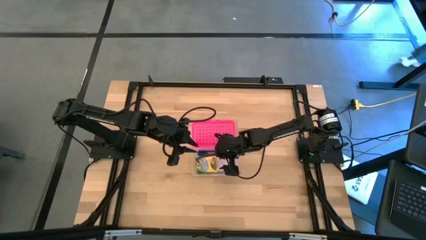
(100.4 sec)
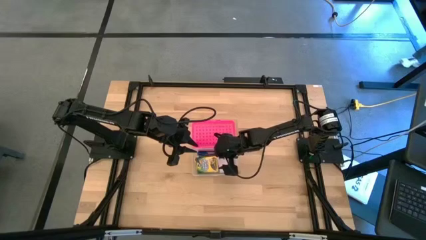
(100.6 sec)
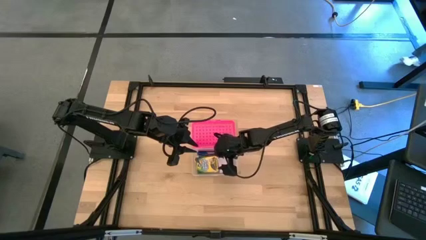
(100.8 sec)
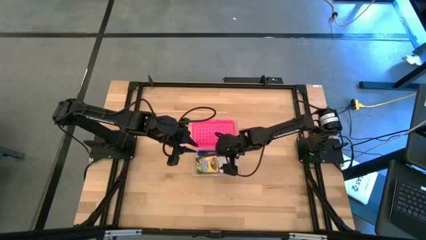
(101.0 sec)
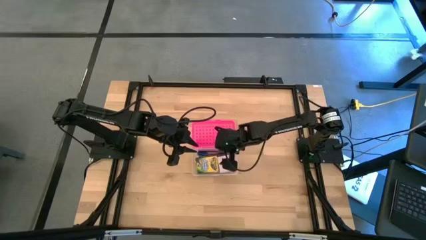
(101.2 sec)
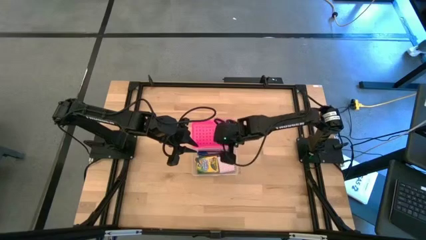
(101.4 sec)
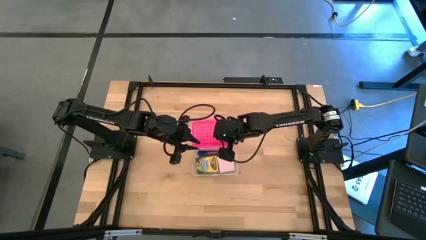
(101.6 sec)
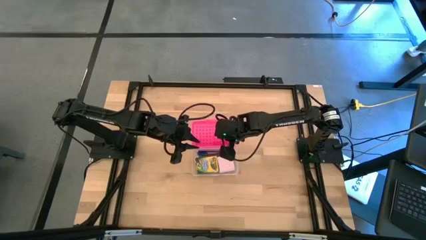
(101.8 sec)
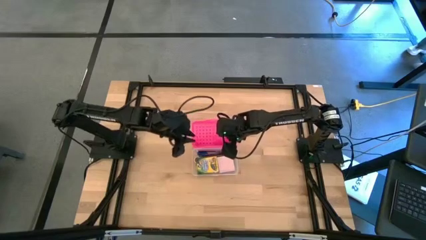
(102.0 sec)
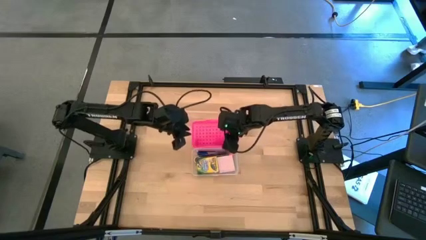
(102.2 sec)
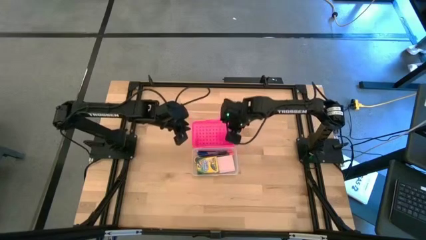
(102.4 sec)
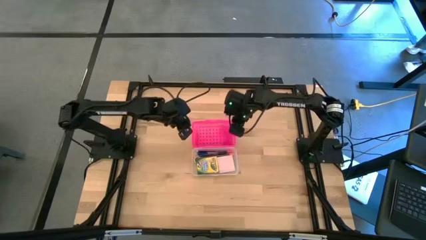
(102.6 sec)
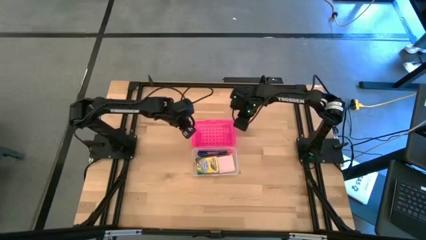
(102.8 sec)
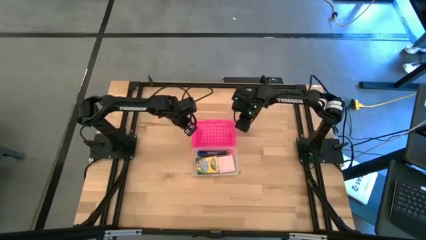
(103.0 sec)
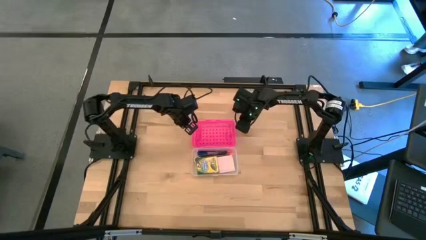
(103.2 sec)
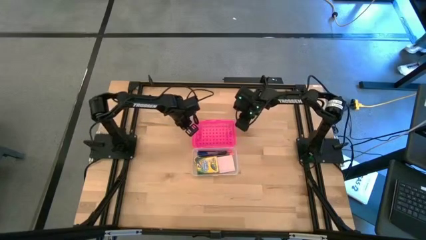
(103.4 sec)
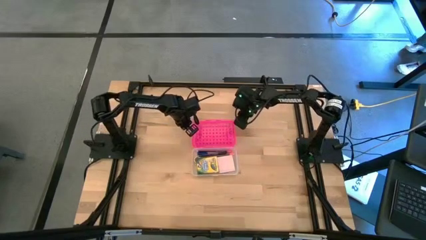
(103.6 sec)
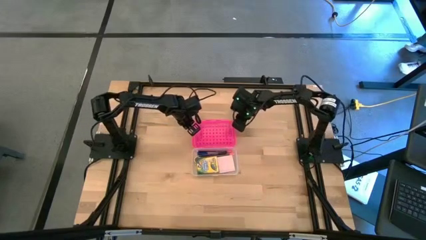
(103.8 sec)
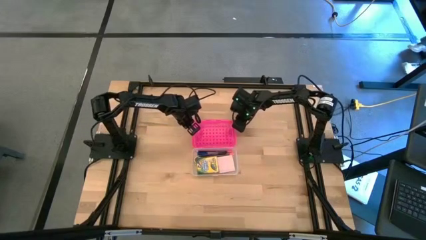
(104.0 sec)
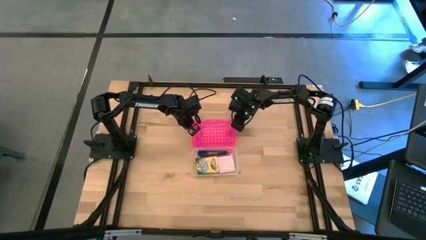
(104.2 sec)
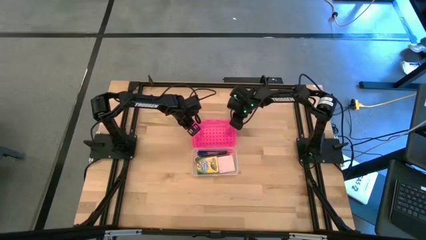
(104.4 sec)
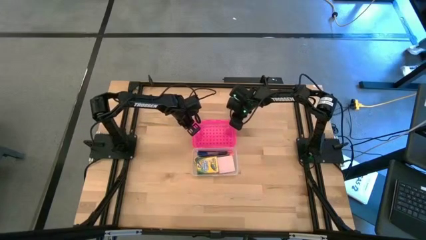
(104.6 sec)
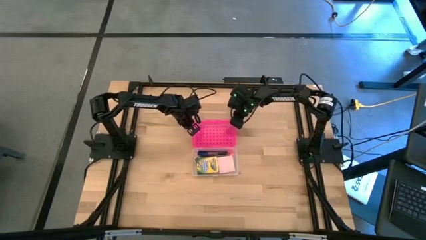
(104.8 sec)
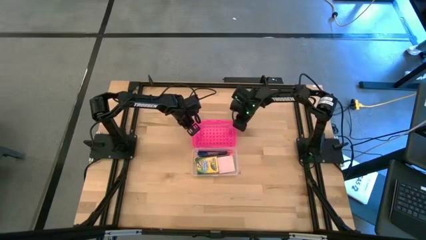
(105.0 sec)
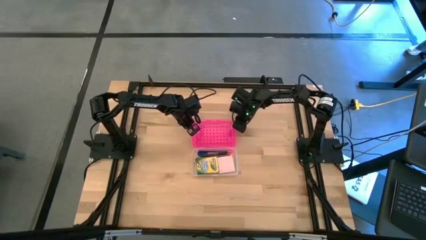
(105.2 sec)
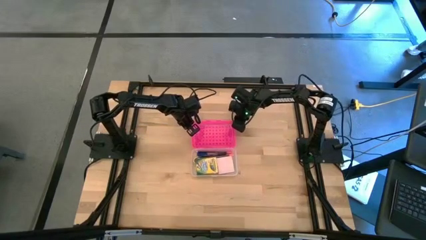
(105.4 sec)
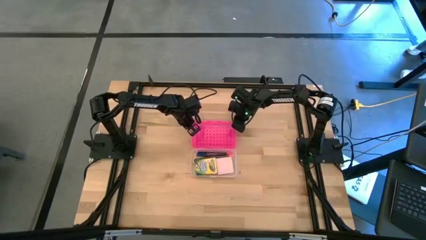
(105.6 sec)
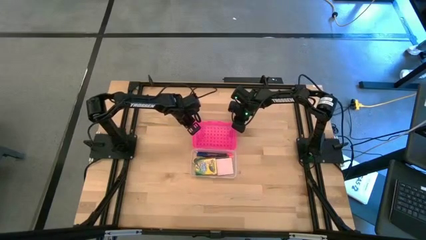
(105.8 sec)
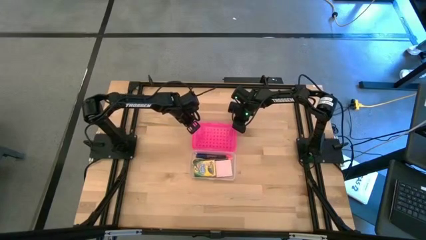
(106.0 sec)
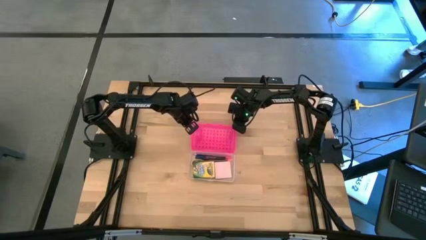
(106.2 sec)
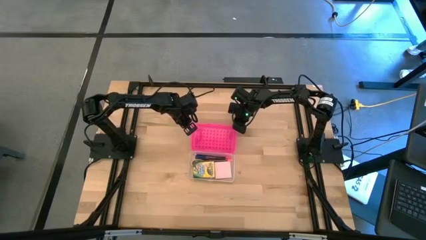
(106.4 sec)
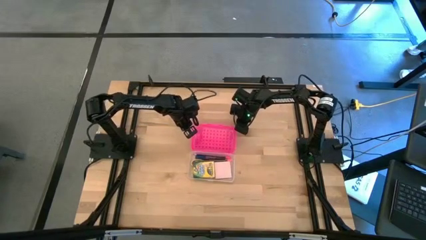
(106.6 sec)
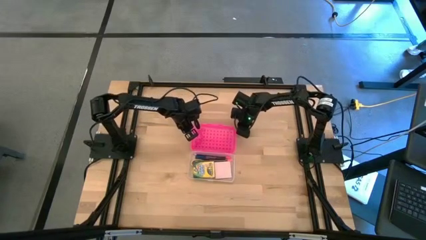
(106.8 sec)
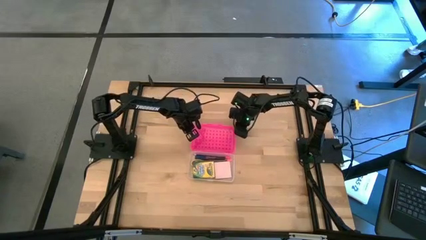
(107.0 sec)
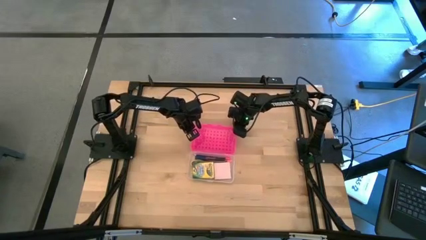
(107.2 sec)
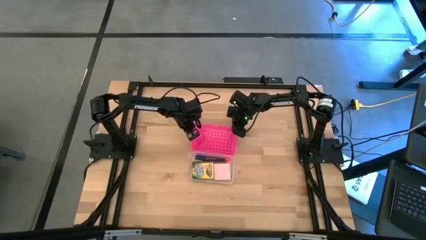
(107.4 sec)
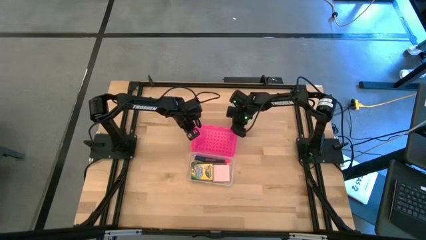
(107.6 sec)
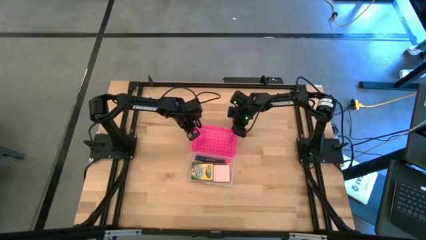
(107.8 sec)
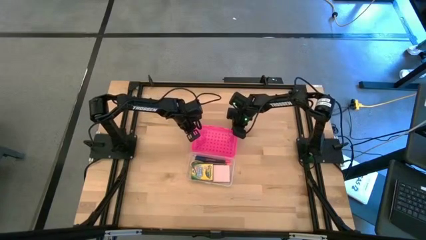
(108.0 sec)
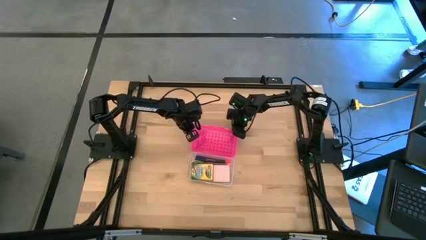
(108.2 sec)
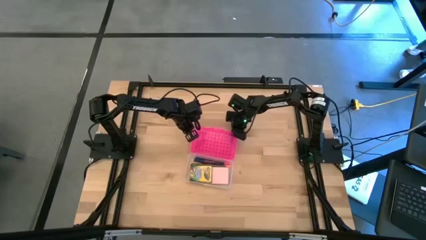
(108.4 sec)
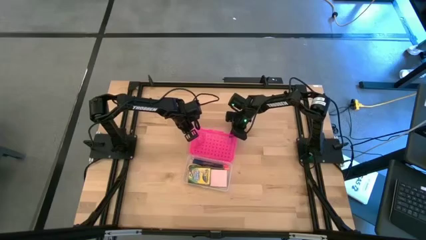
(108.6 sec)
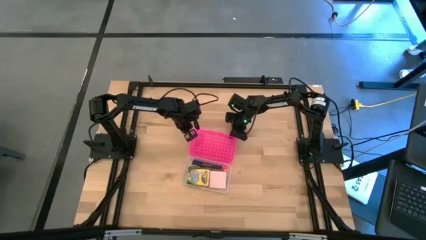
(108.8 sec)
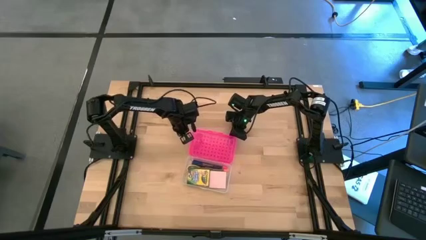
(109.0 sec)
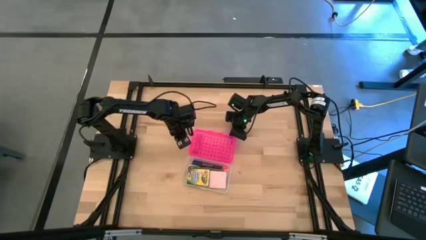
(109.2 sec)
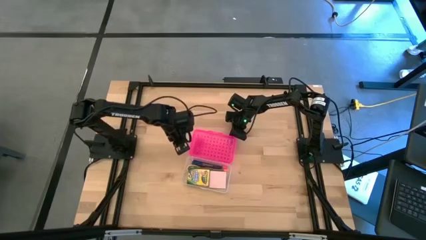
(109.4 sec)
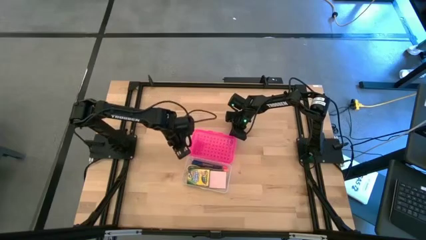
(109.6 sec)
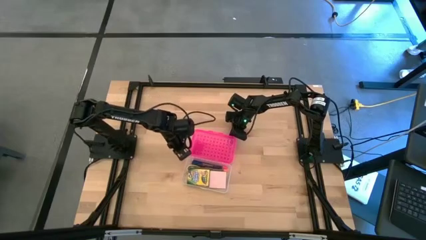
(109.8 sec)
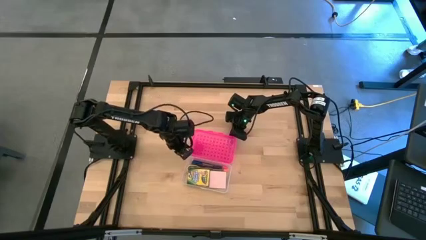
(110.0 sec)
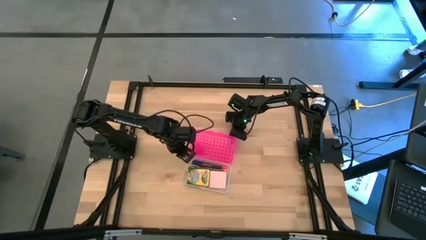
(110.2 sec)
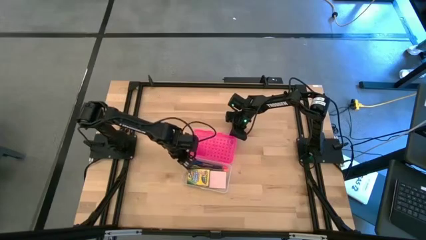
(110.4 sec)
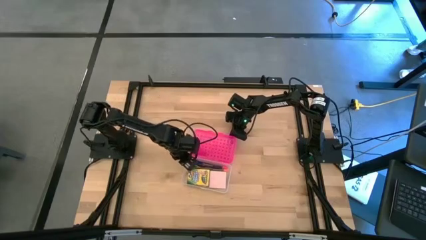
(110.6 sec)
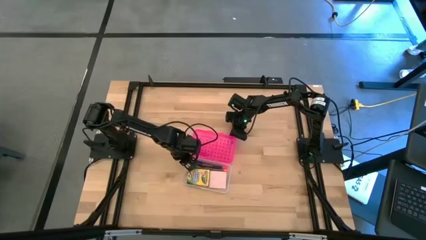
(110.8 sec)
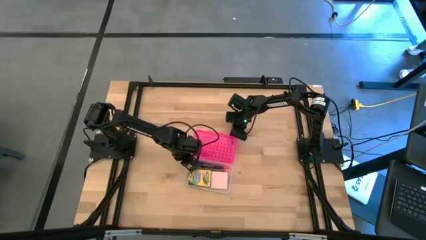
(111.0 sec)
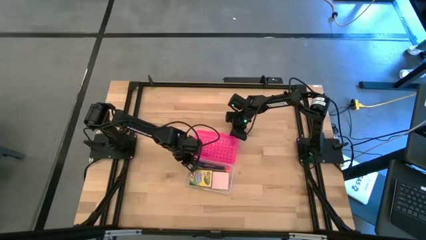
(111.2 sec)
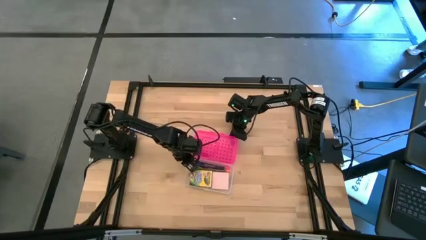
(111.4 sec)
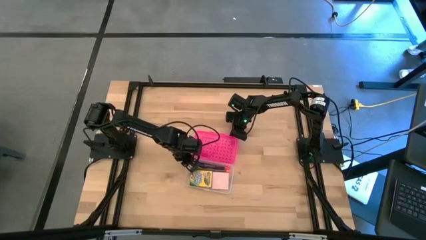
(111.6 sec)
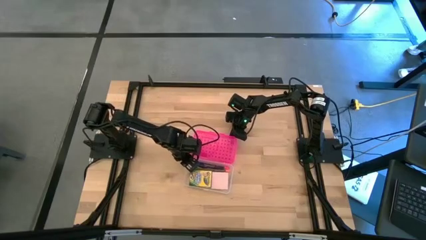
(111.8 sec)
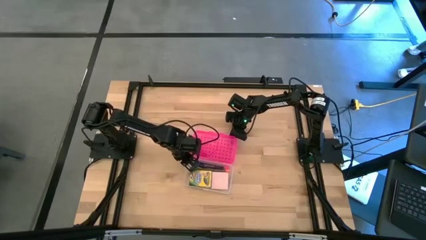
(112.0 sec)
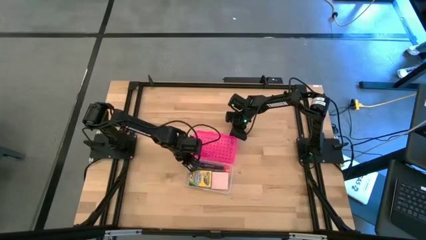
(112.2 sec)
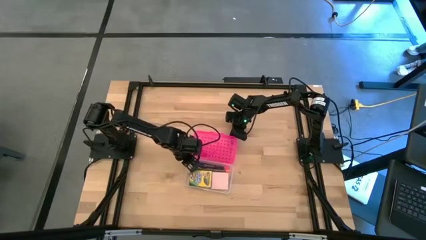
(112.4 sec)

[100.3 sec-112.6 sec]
Task: Pack school essentials
Close the cover of the school supply organizer

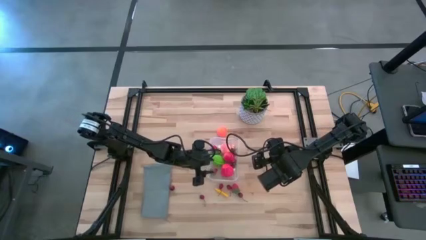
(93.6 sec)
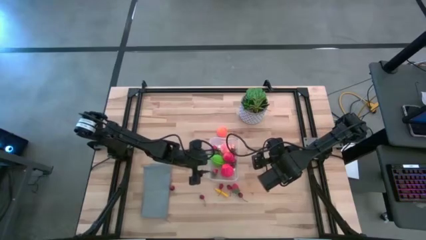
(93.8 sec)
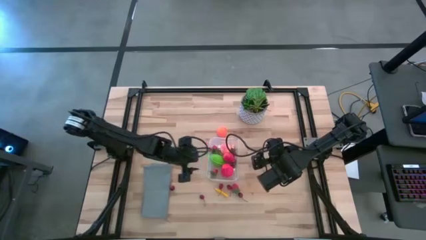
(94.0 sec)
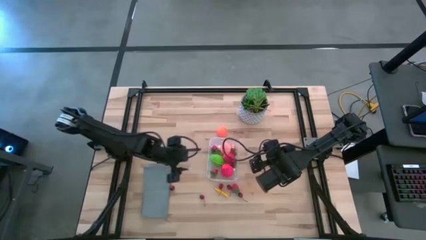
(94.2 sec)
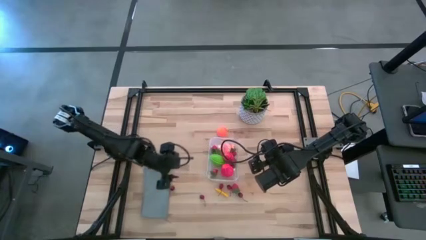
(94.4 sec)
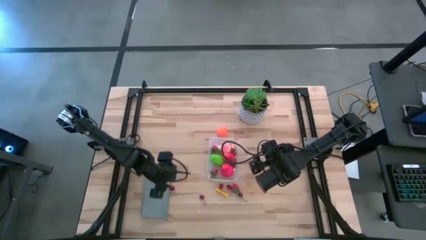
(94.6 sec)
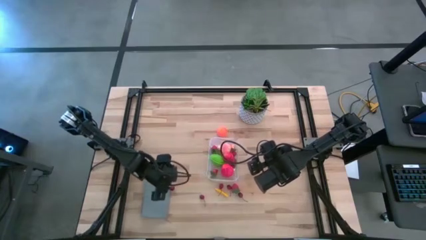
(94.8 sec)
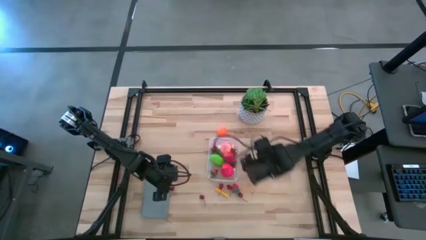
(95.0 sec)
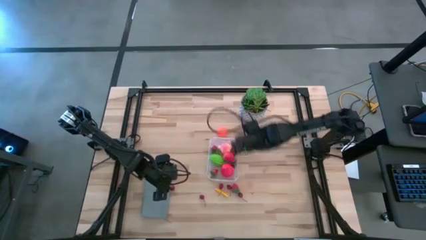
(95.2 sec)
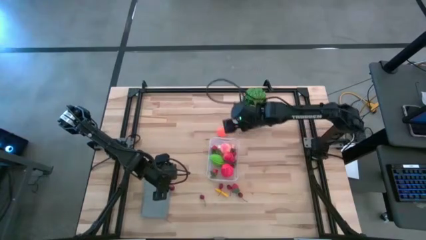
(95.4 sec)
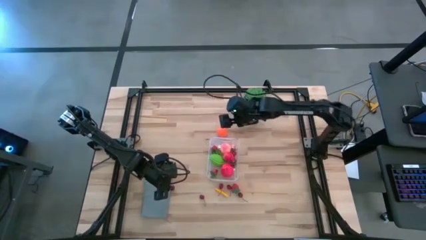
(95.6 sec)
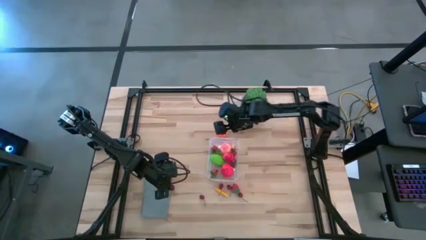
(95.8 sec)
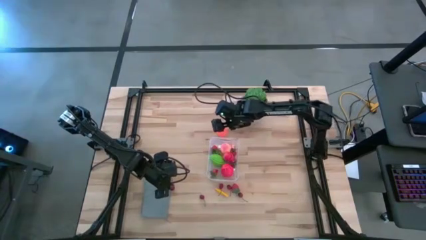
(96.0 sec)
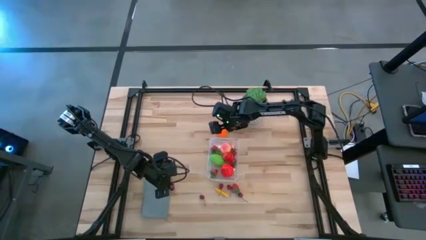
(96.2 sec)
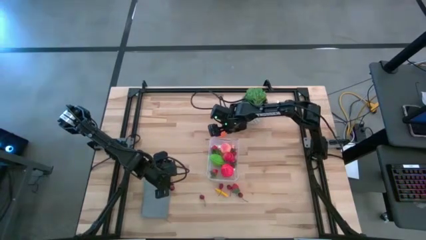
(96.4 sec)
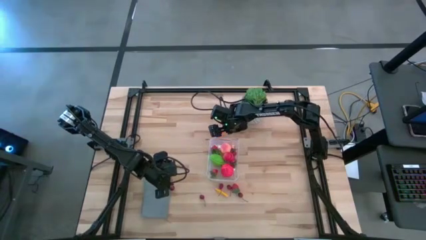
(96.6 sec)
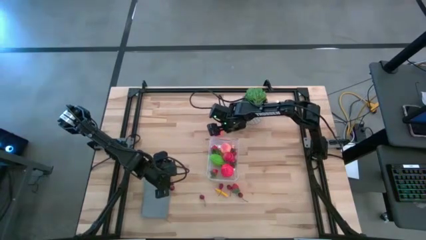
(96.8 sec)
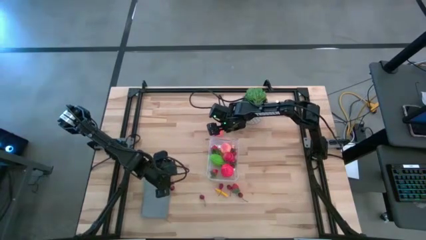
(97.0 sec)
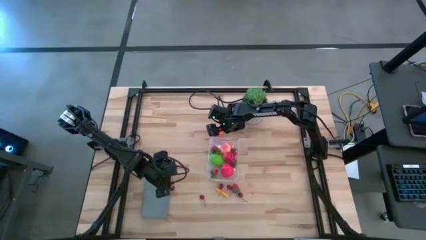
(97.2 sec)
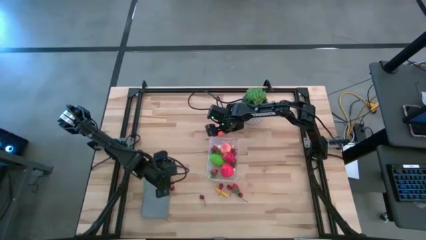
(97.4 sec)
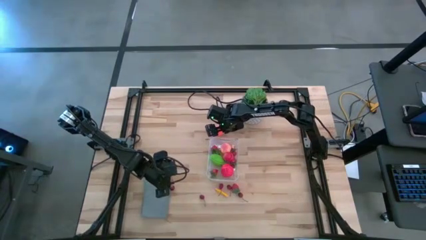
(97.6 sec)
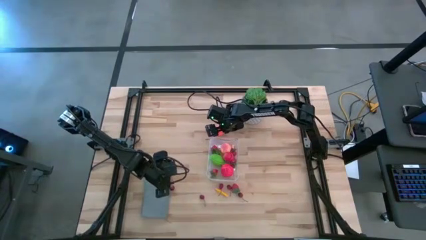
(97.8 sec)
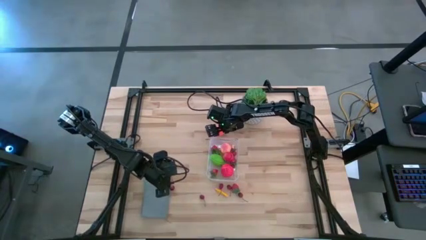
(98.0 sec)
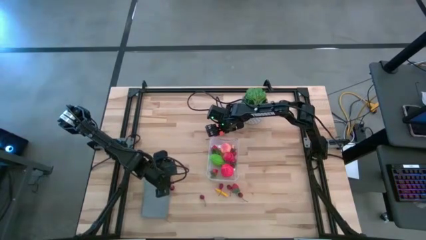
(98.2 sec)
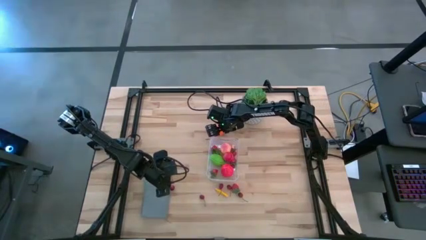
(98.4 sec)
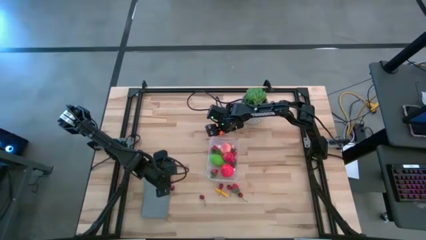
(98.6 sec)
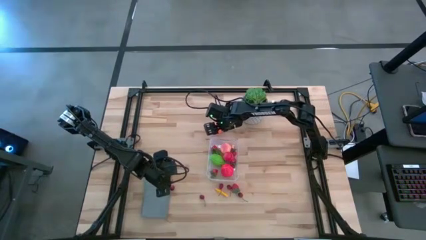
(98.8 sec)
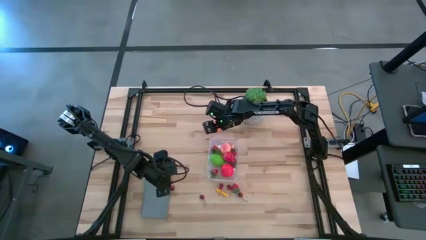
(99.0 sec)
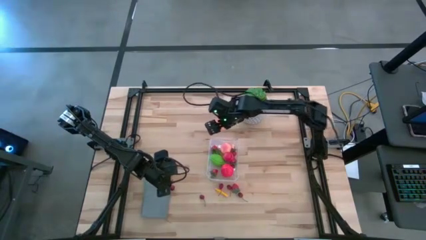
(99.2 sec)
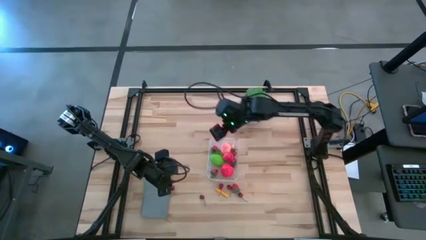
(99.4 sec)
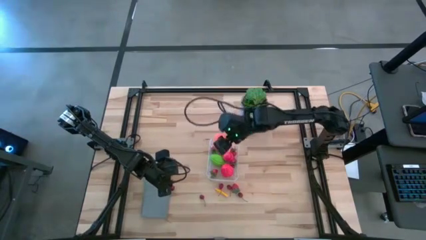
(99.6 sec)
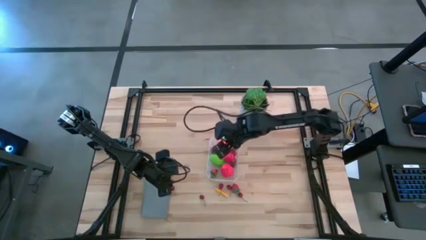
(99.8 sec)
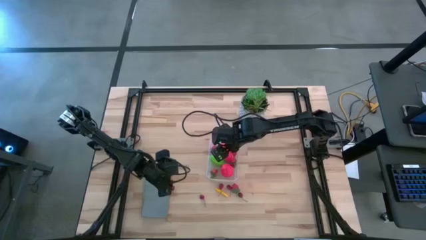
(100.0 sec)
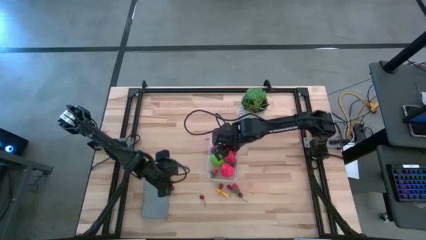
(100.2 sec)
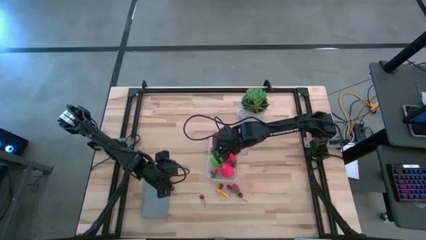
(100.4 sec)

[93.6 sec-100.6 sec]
Task: Pick and placing Produce into tupperware
Put the orange pumpkin into the transparent bin
